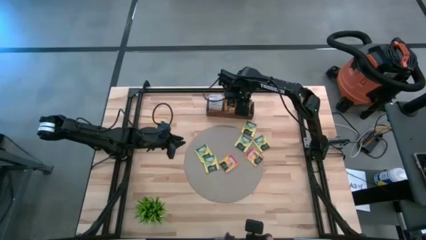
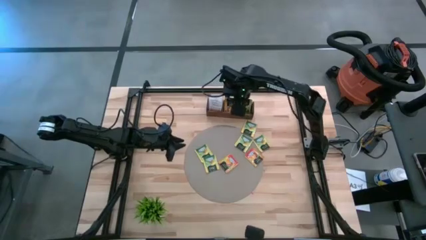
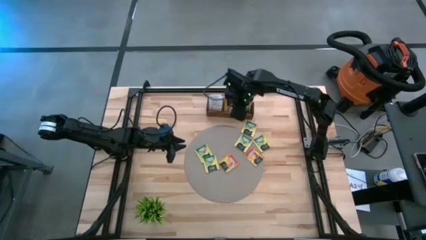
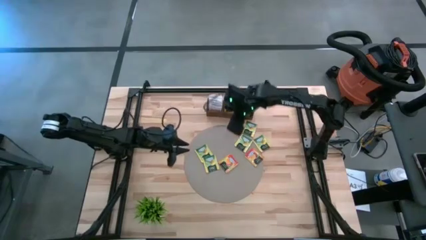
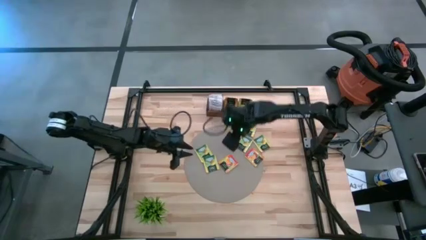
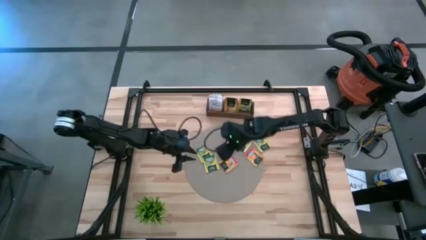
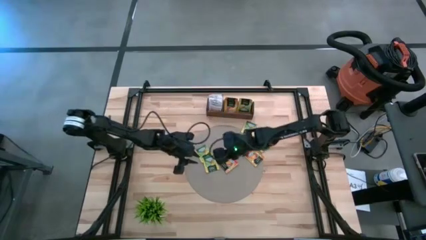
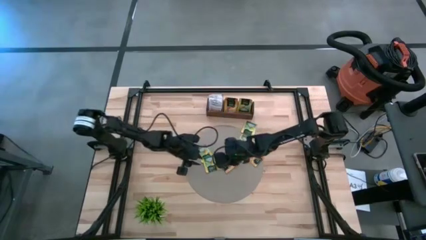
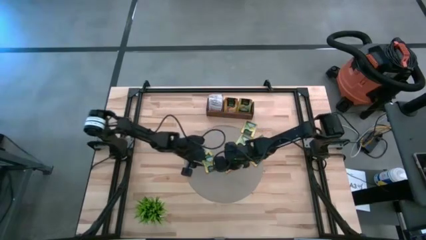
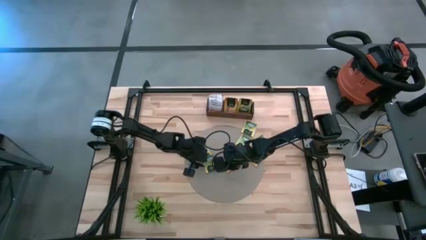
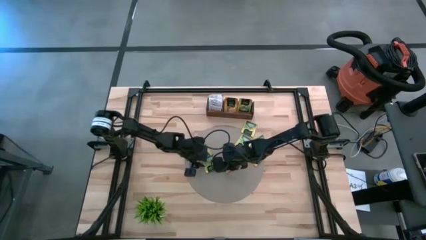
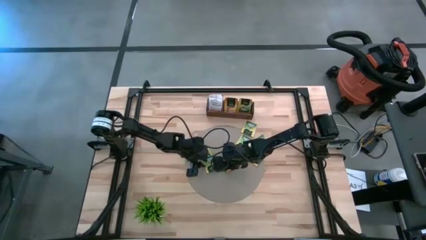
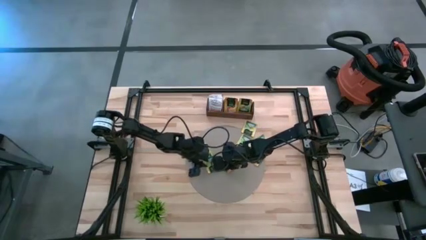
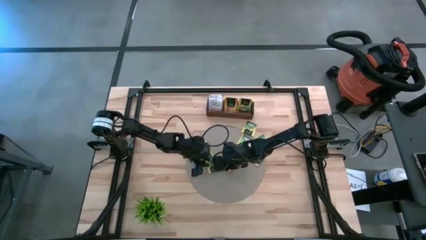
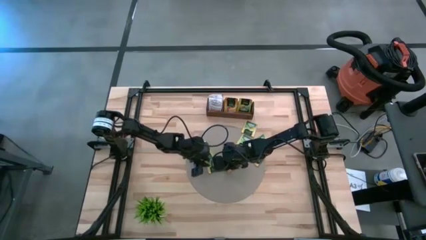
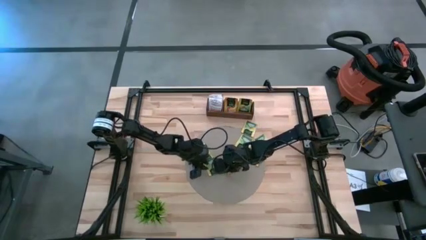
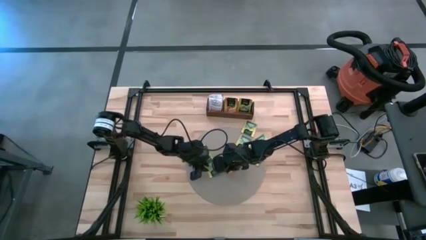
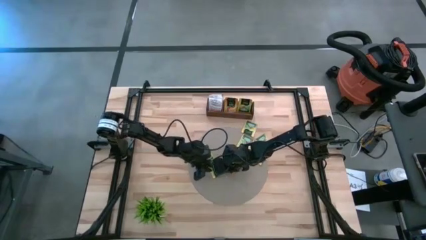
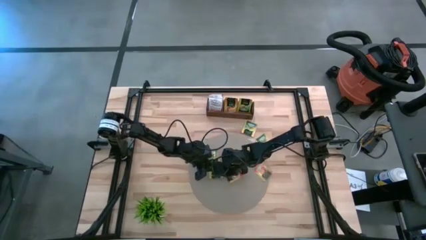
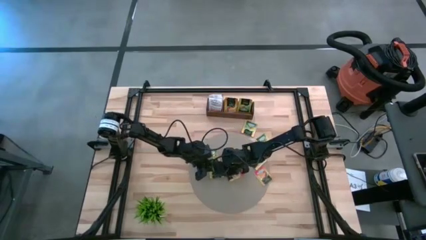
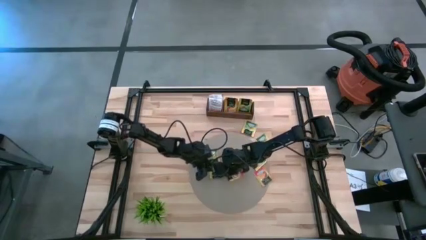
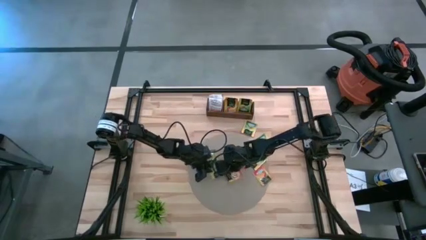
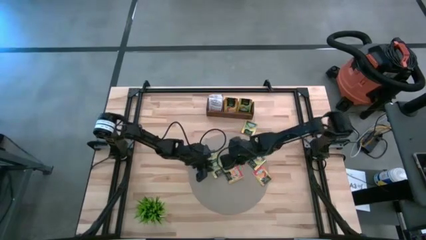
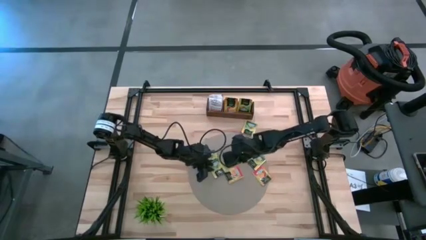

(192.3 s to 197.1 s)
Task: Pick & Place Tea
Put the yellow tea bag into the right section of the wooden organizer

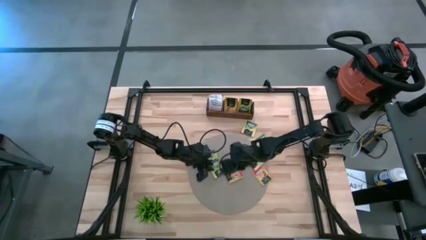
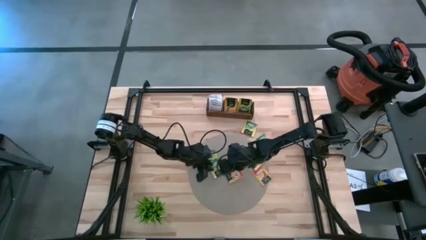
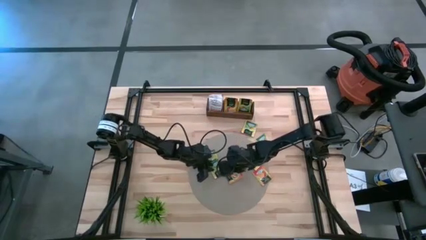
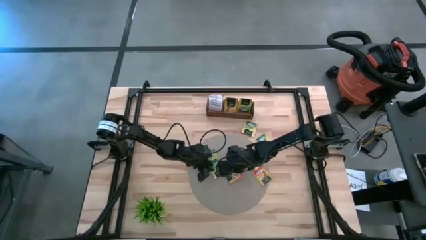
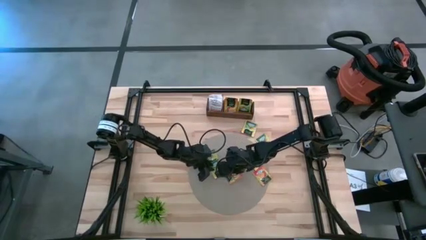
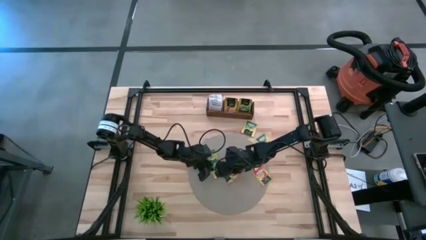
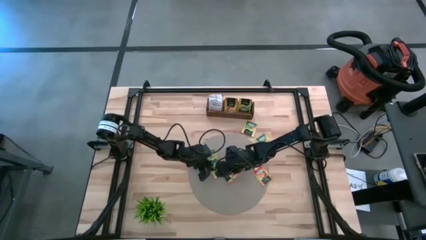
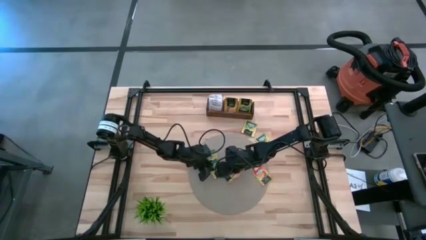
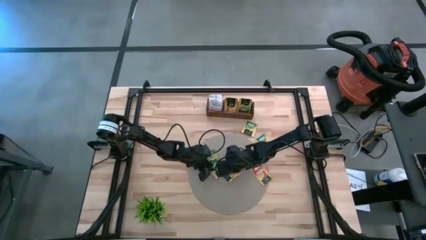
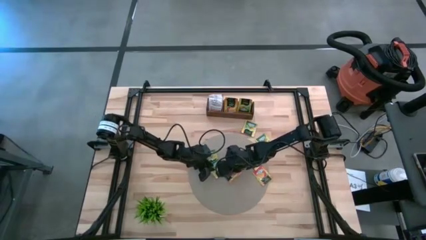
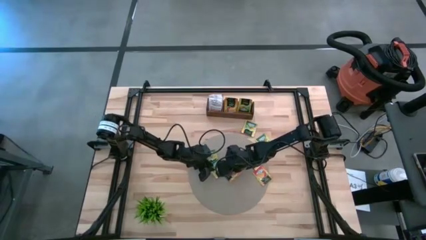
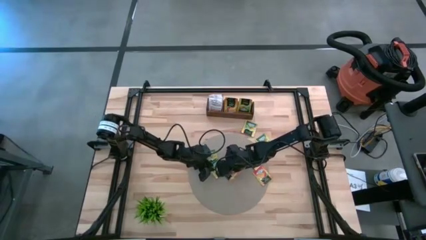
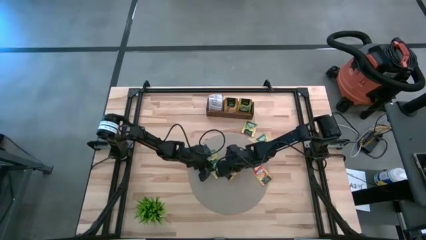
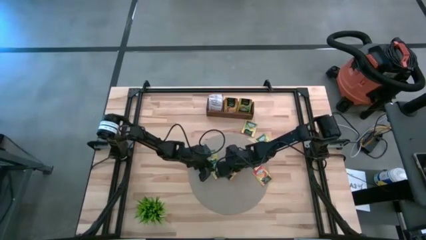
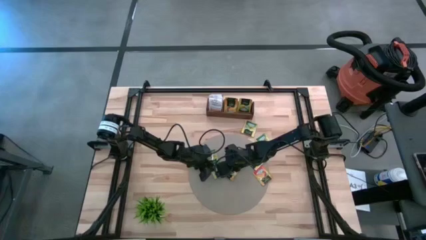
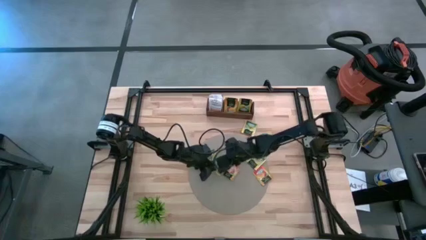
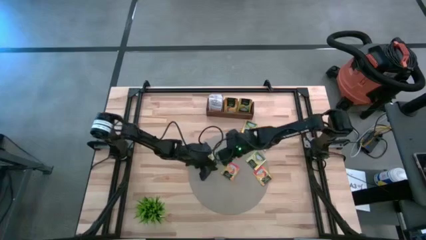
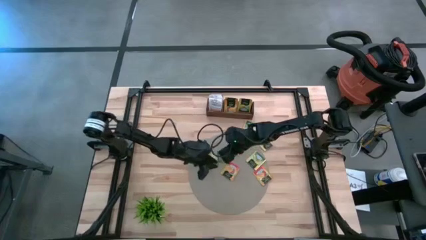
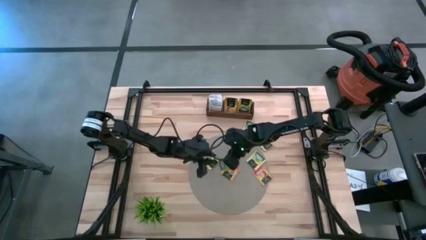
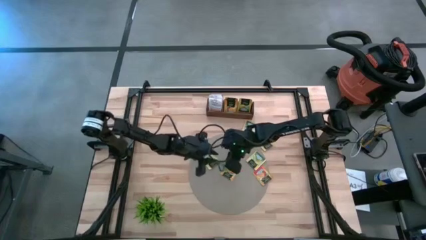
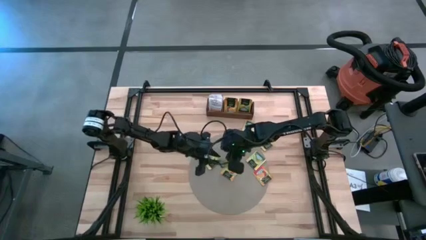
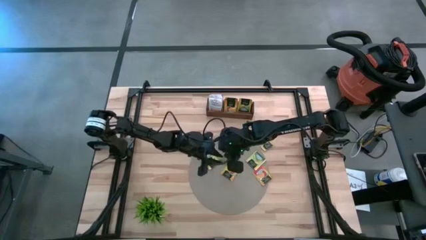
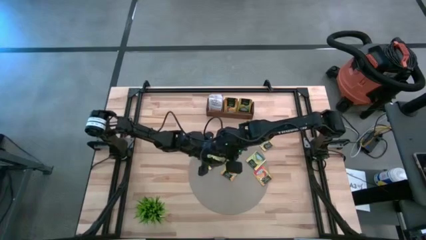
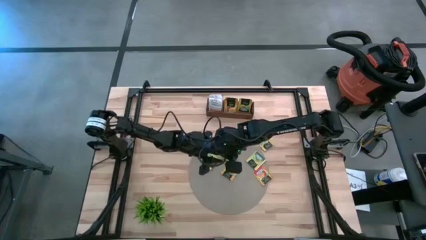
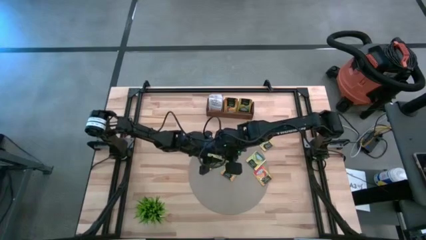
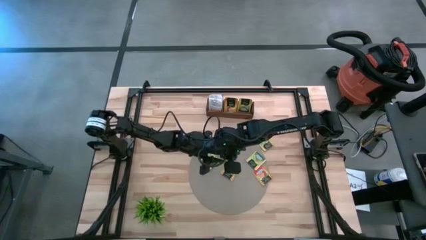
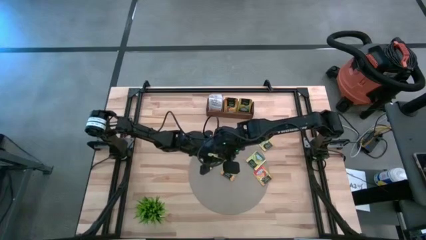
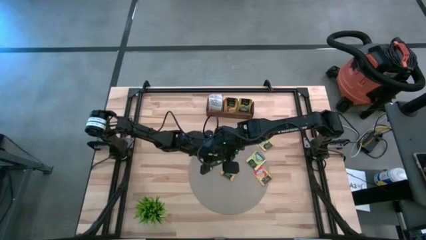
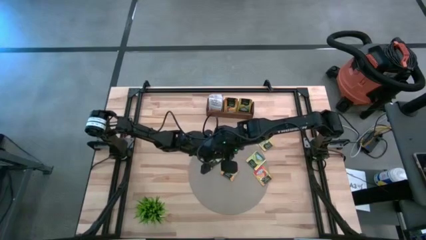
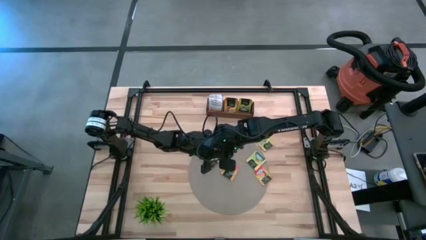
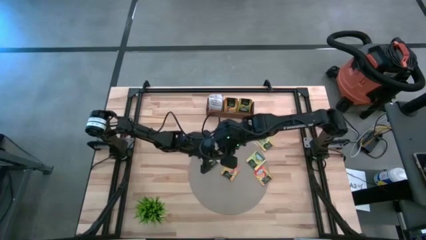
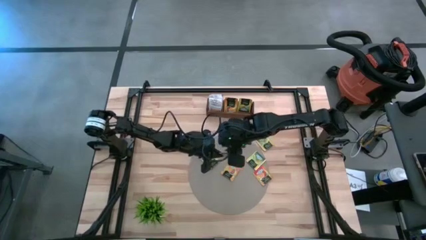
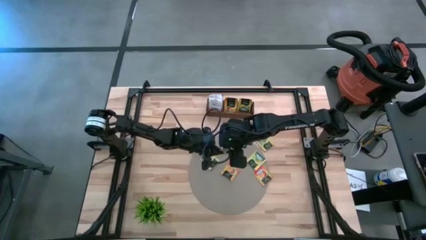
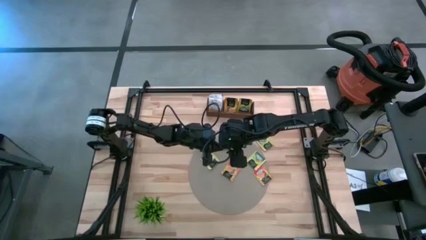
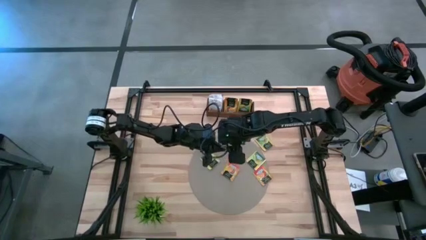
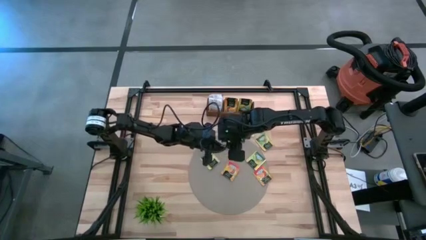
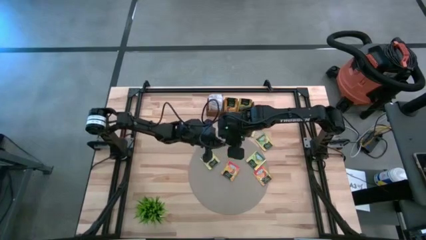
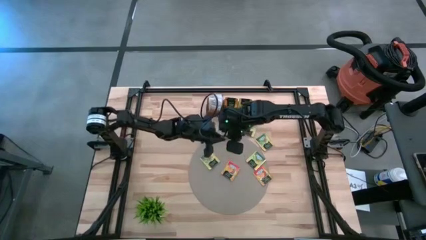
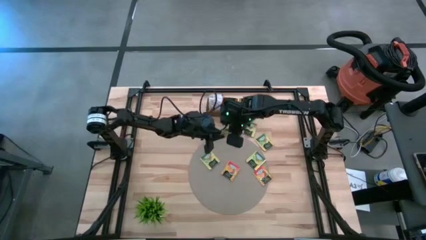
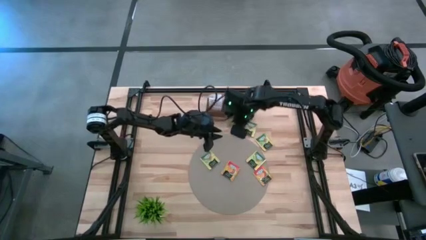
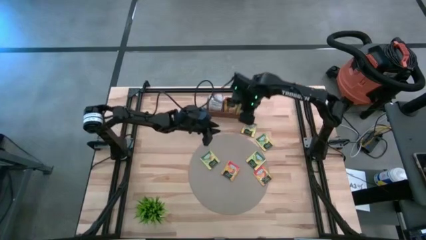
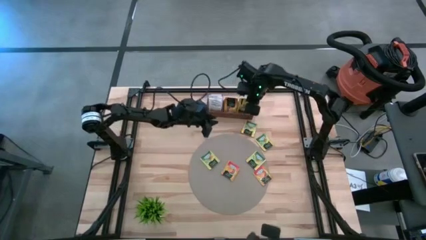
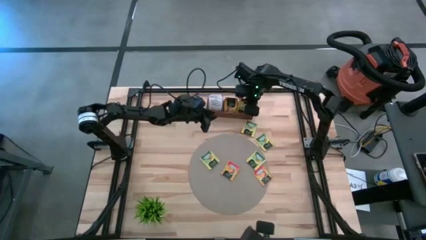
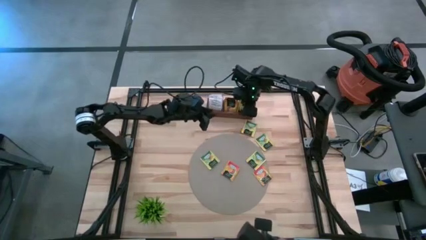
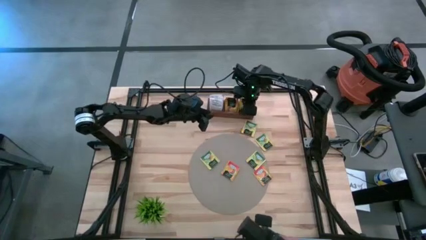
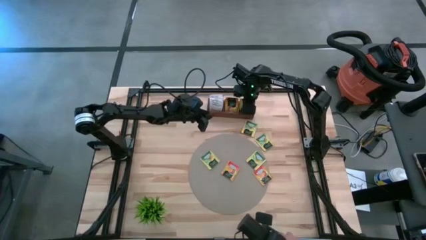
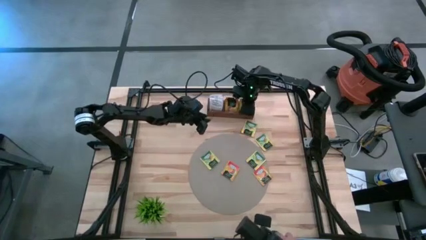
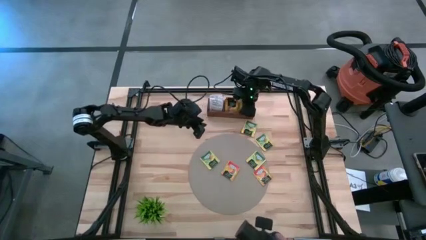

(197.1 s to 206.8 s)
Put the yellow tea bag into the right section of the wooden organizer
